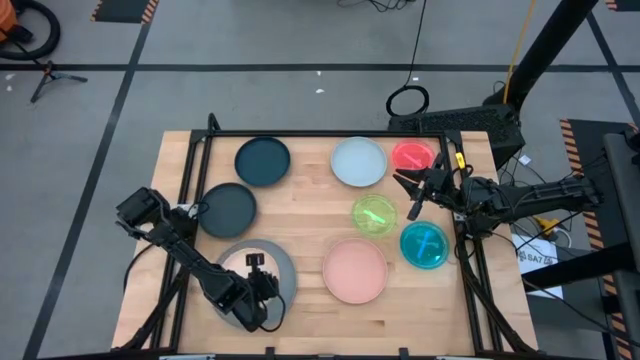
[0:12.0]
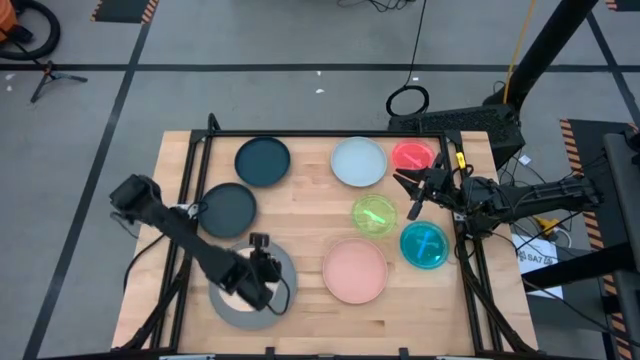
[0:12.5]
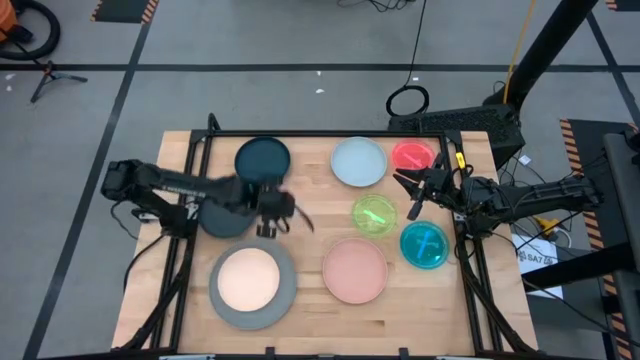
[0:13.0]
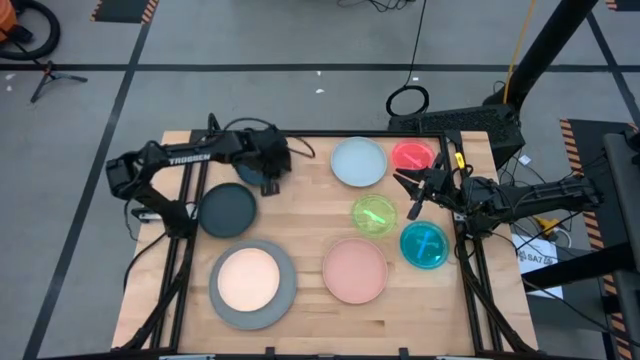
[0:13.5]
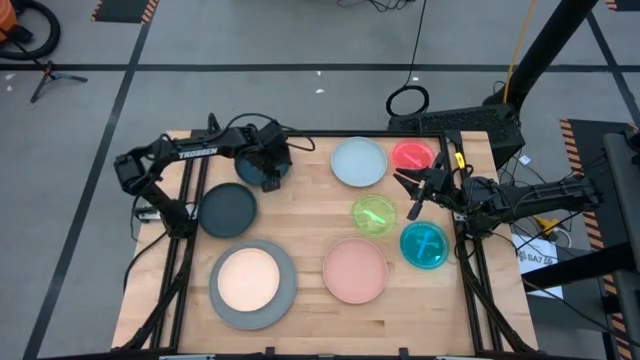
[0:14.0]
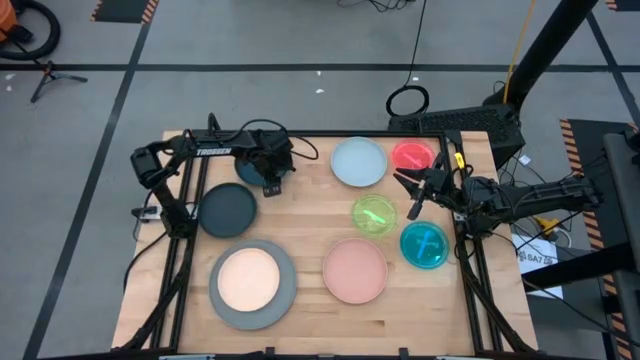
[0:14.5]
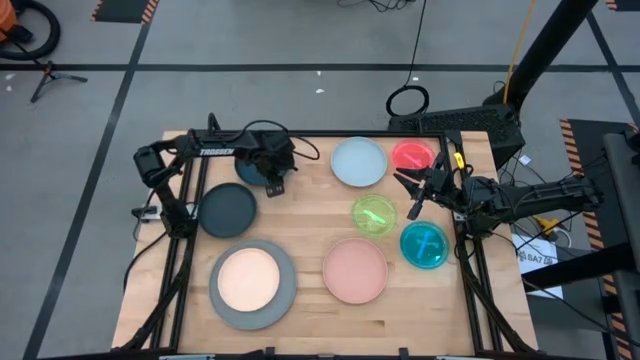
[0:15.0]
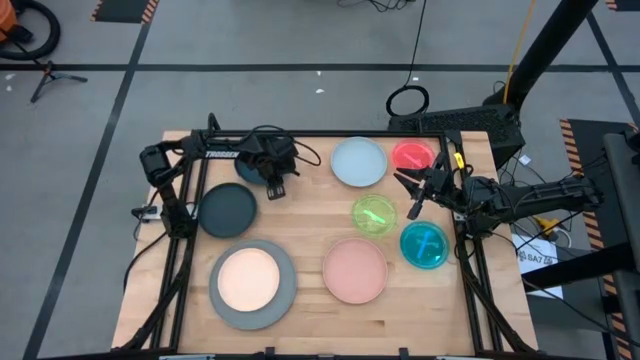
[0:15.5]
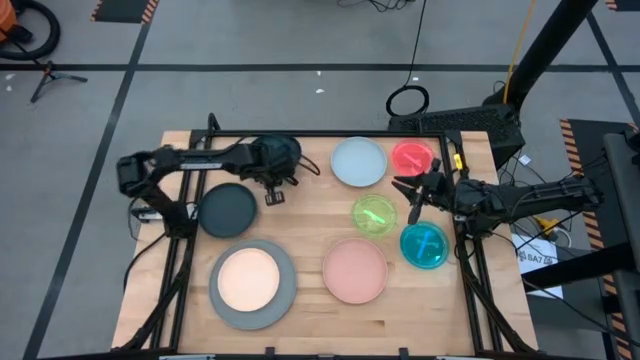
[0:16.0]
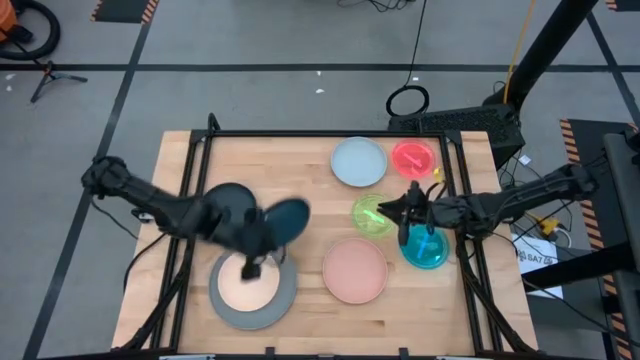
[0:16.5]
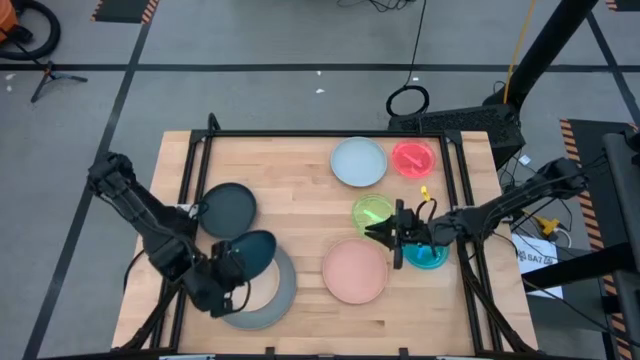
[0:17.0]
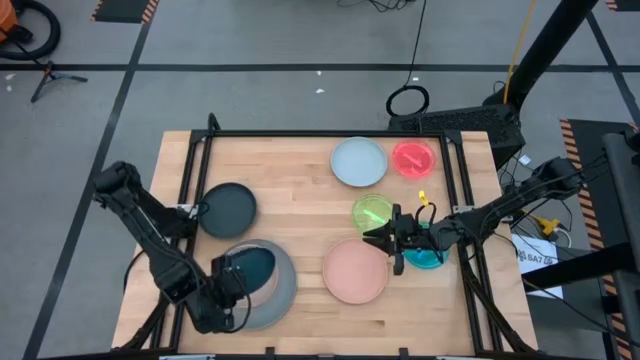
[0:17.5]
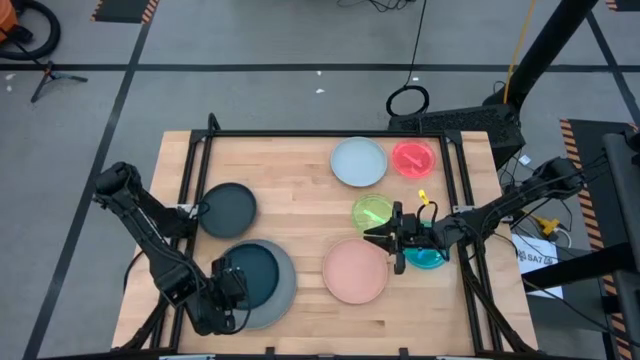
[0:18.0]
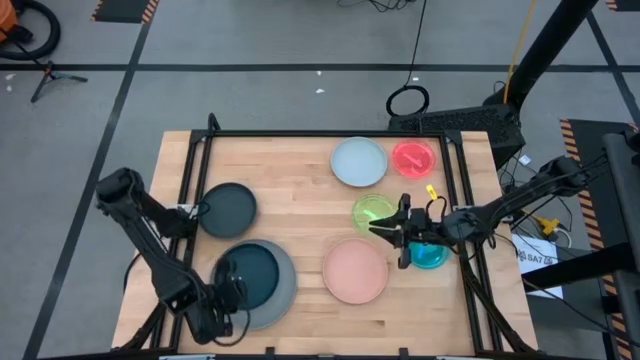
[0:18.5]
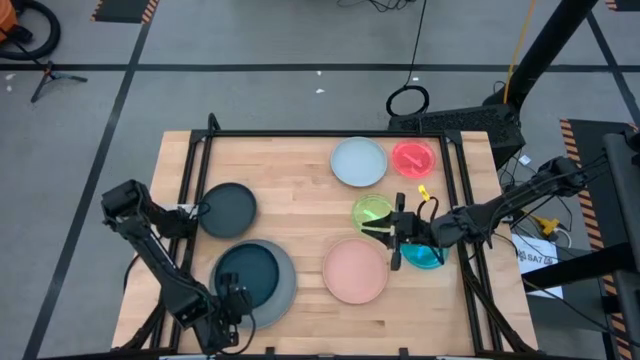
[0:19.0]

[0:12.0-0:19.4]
Task: Stack plastic plates
Stack the top blue plate on top of the light orange plate

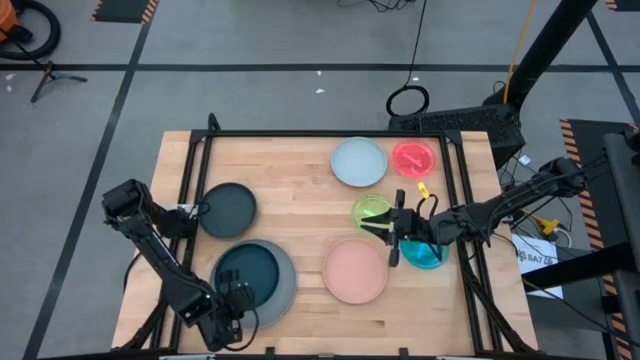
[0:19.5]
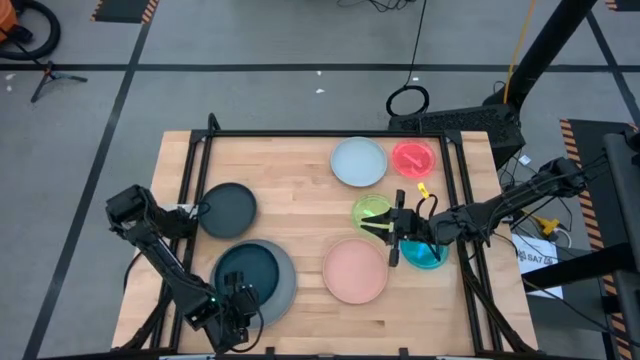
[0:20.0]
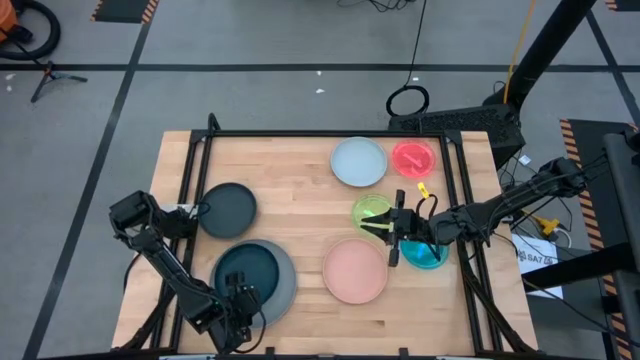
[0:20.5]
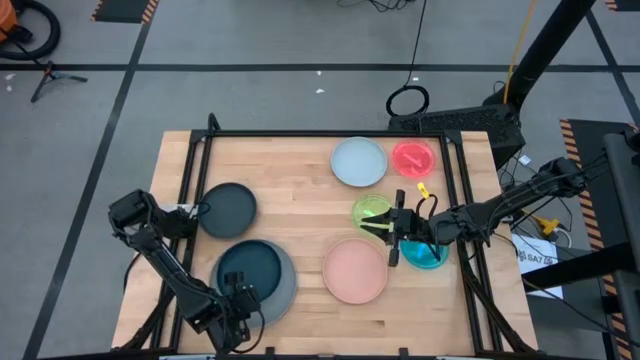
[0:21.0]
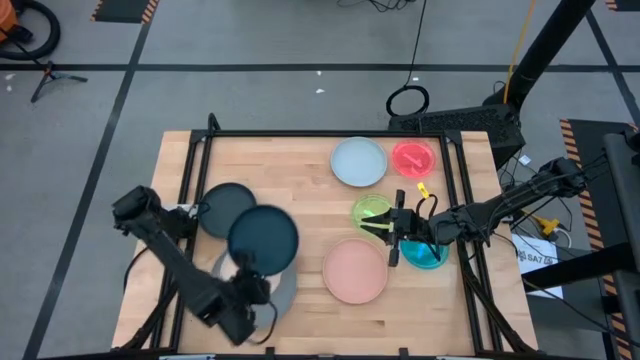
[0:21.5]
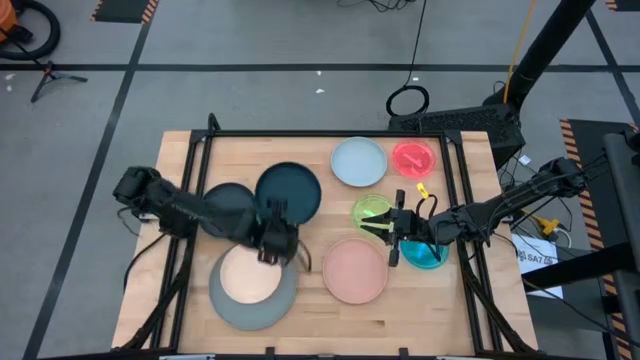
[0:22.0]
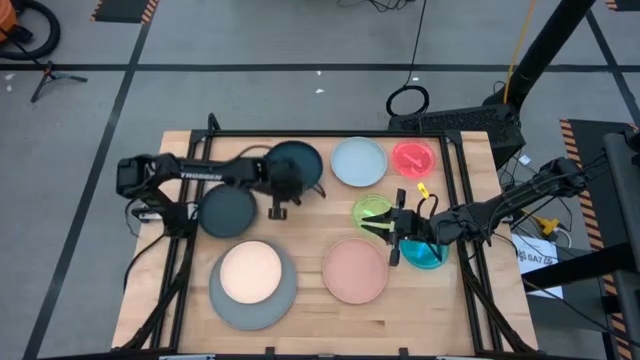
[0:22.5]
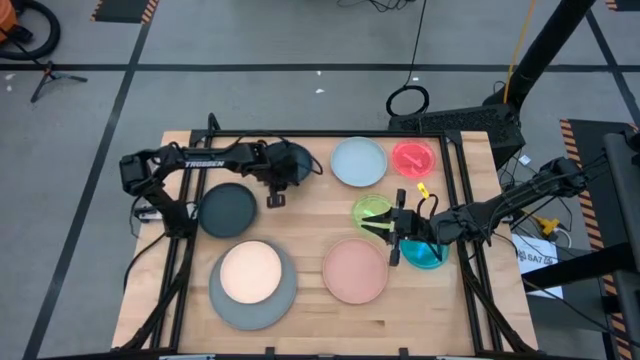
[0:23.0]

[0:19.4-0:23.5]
Remove the bottom blue plate from the stack of plates

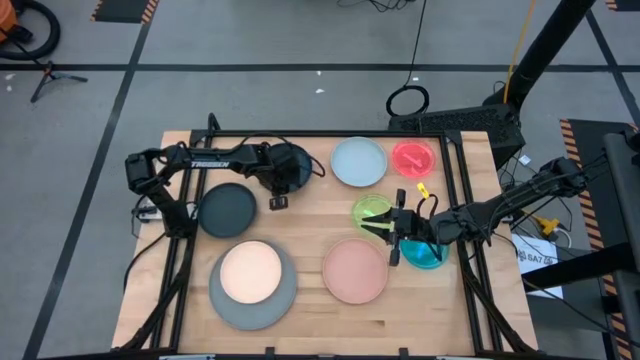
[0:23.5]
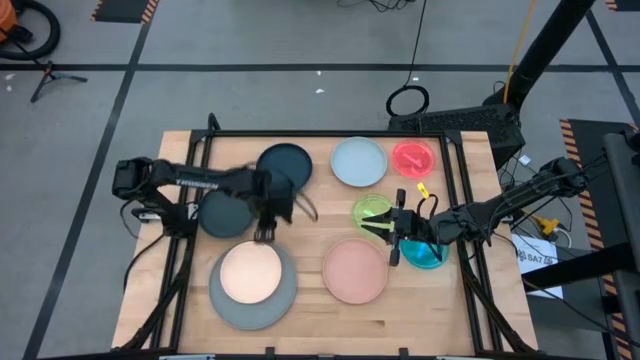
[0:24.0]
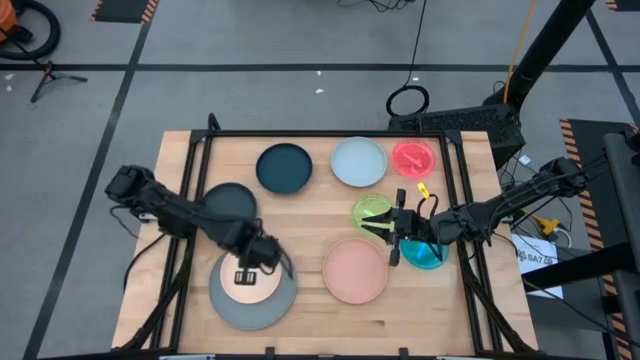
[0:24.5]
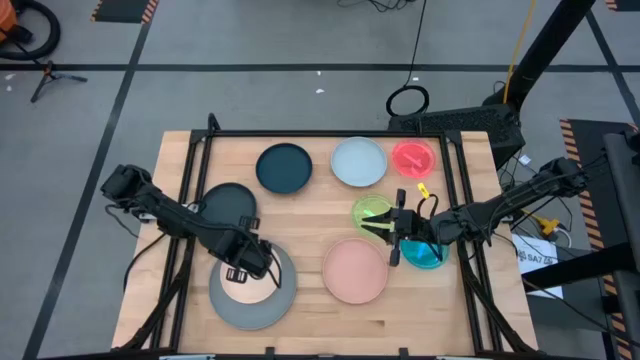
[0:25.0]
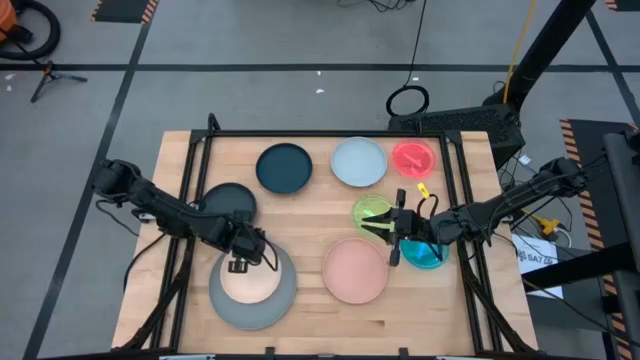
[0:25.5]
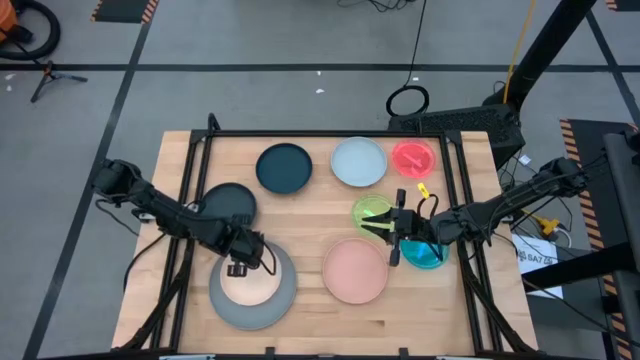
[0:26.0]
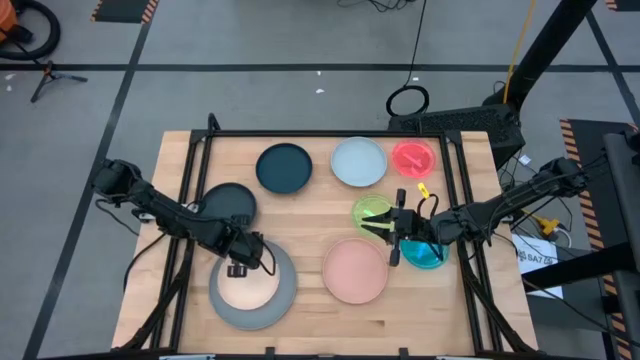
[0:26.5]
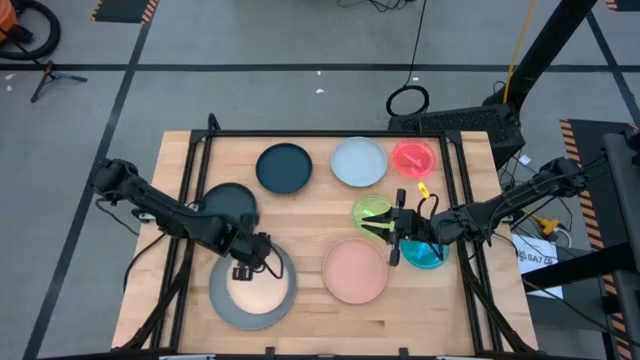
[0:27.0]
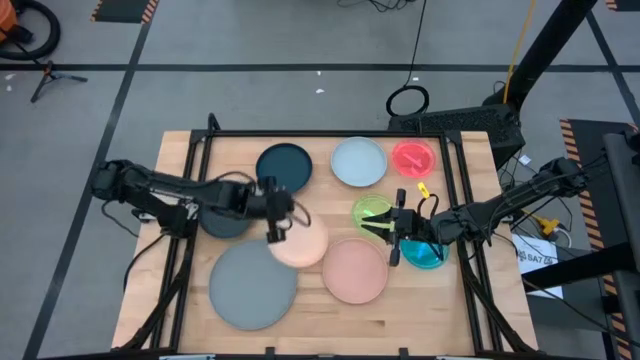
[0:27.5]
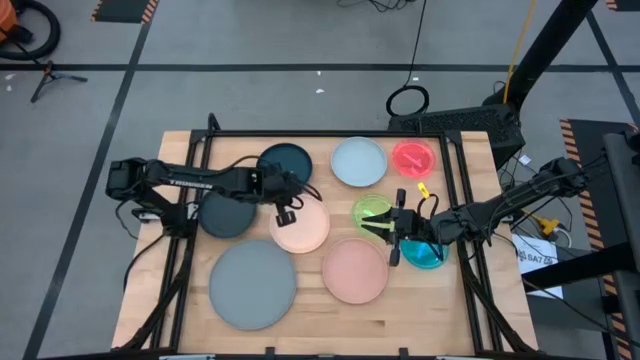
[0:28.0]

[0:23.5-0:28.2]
Remove the light orange plate from the gray plate

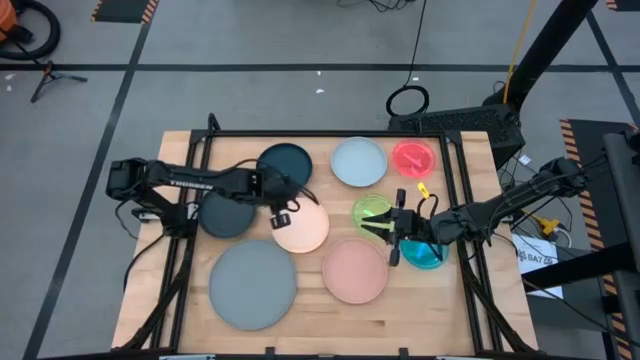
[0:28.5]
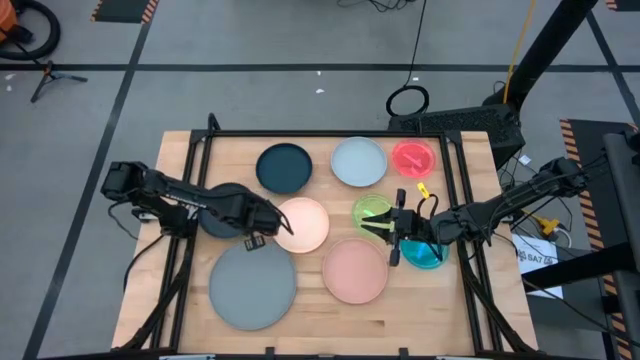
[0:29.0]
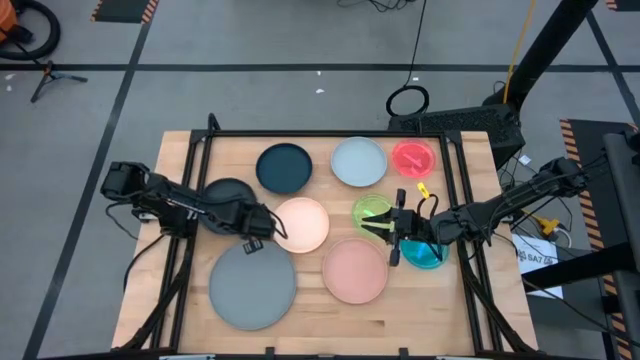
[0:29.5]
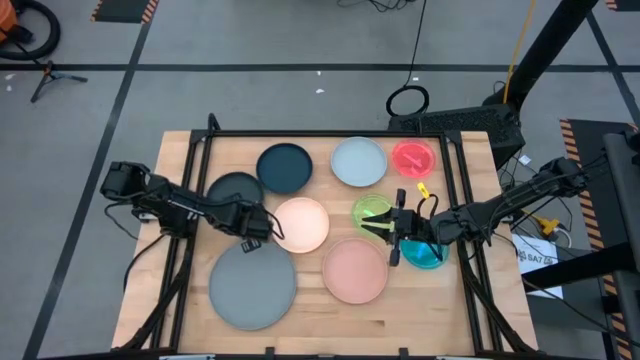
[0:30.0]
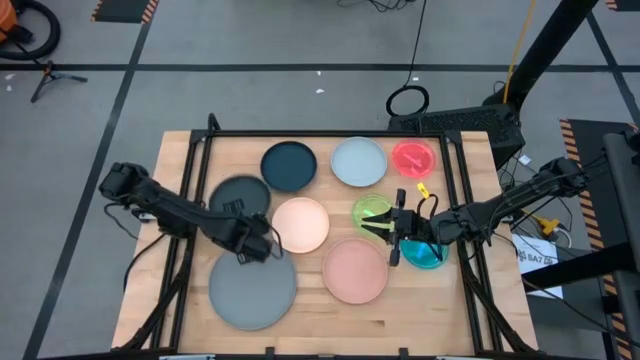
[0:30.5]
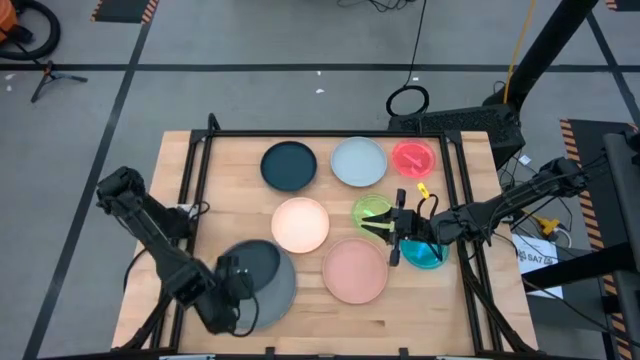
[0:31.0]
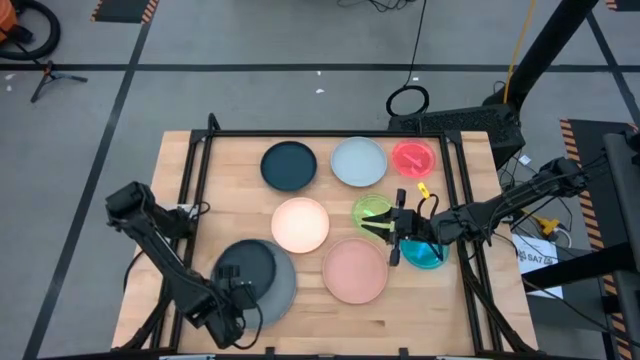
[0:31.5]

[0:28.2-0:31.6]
Stack the bottom blue plate on top of the gray plate
